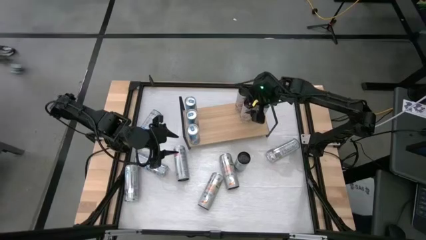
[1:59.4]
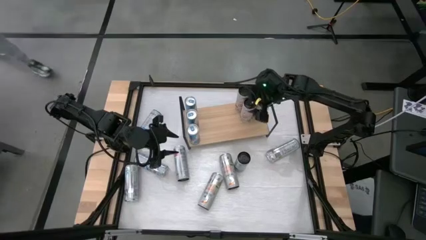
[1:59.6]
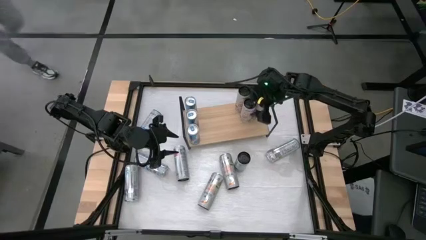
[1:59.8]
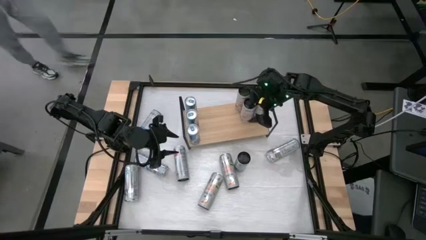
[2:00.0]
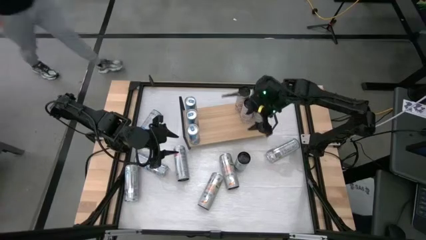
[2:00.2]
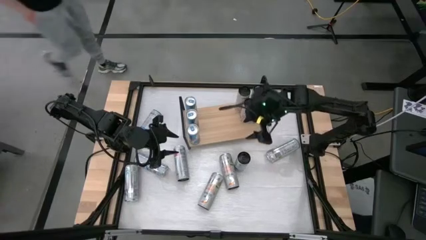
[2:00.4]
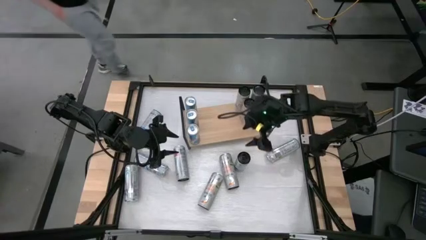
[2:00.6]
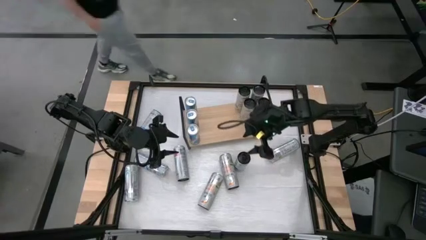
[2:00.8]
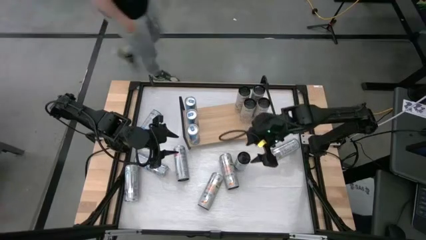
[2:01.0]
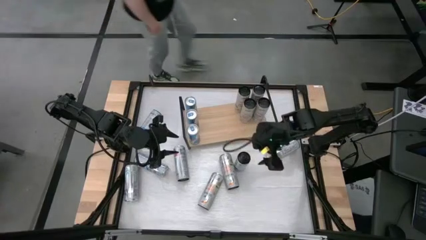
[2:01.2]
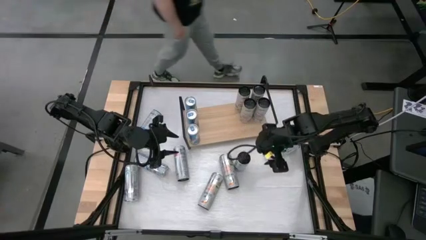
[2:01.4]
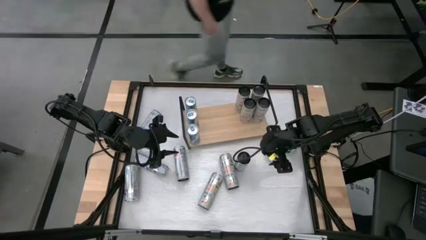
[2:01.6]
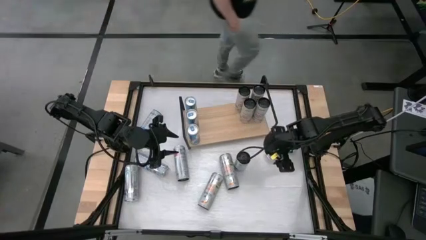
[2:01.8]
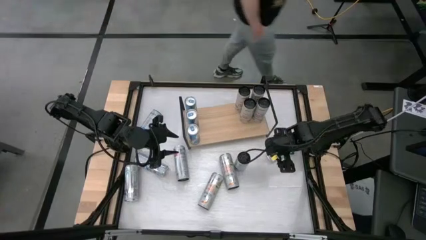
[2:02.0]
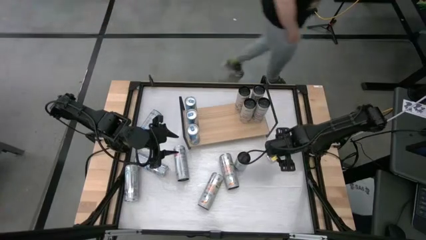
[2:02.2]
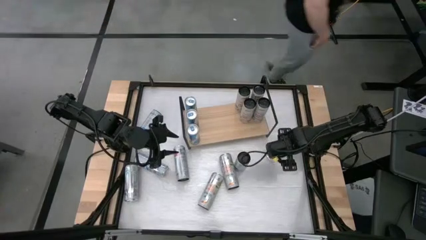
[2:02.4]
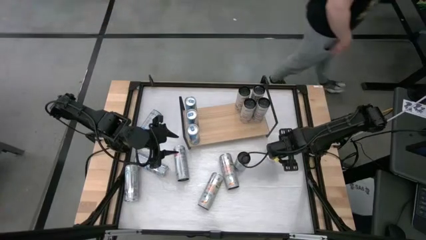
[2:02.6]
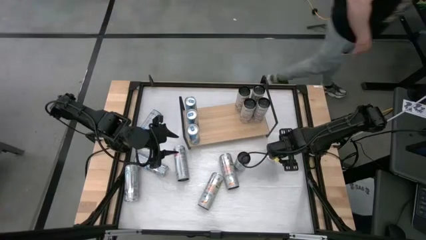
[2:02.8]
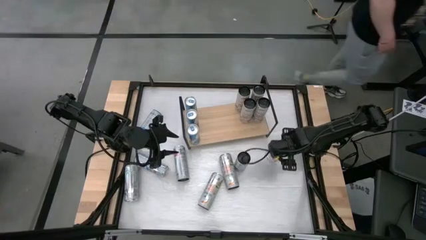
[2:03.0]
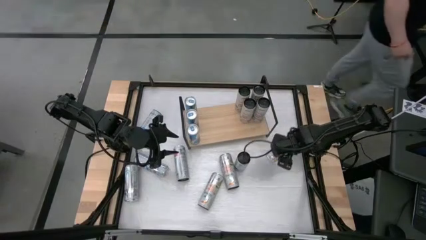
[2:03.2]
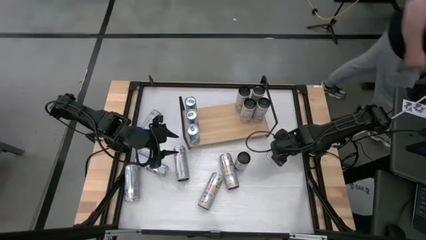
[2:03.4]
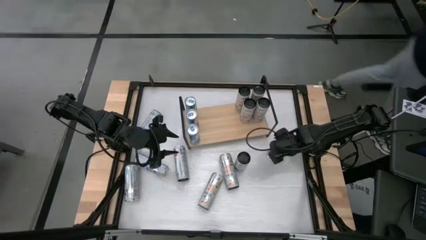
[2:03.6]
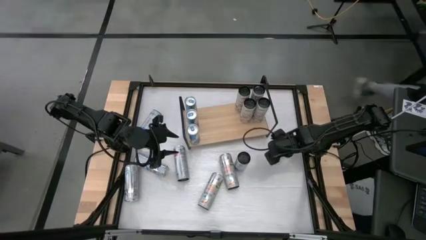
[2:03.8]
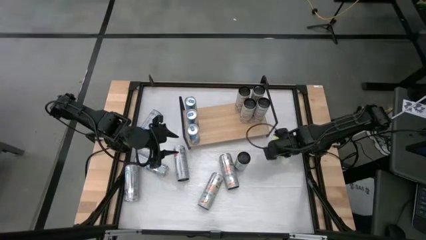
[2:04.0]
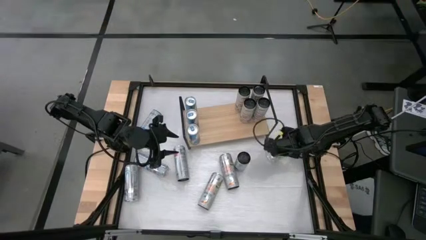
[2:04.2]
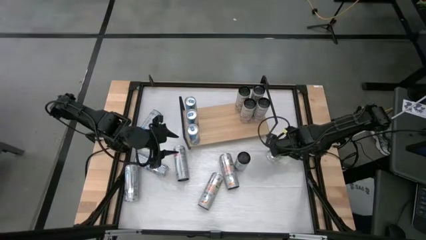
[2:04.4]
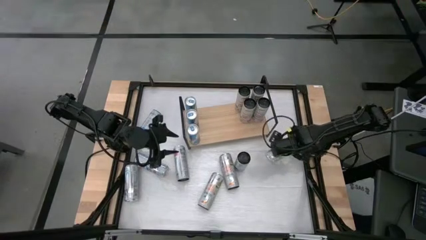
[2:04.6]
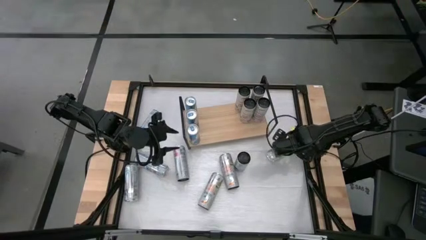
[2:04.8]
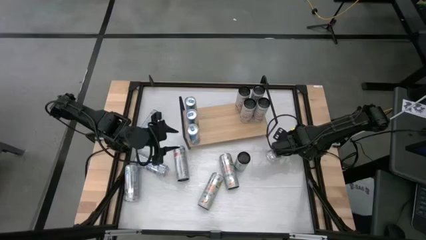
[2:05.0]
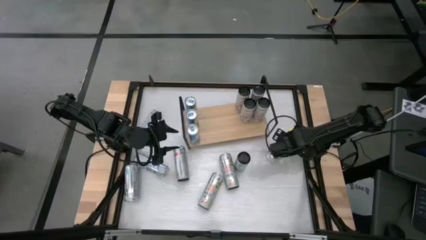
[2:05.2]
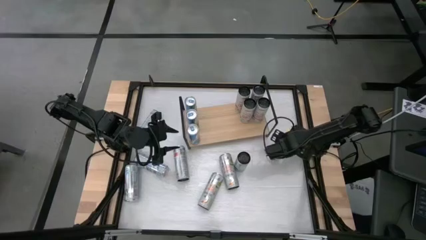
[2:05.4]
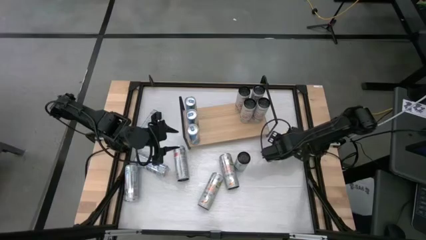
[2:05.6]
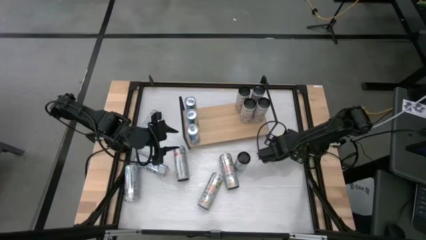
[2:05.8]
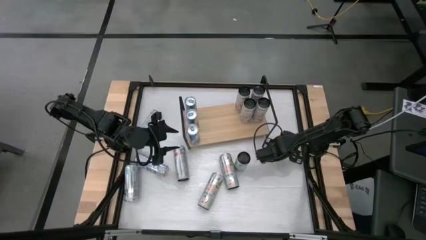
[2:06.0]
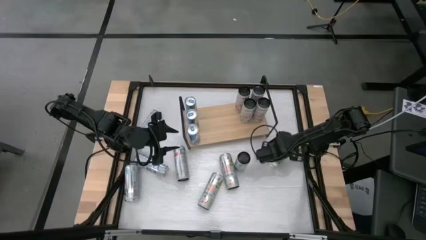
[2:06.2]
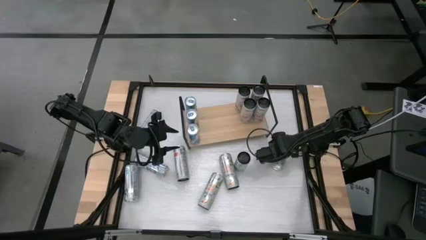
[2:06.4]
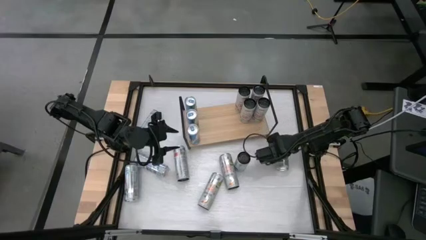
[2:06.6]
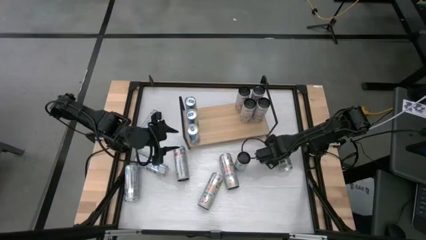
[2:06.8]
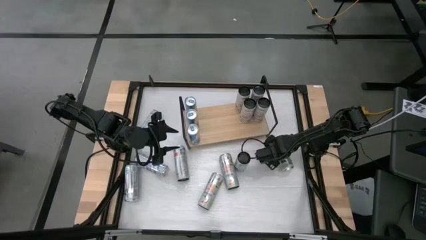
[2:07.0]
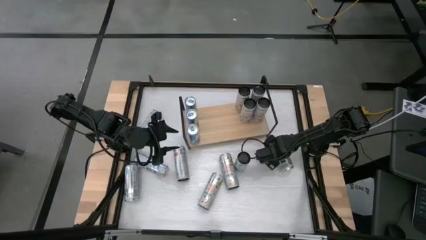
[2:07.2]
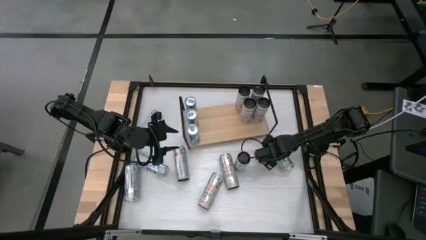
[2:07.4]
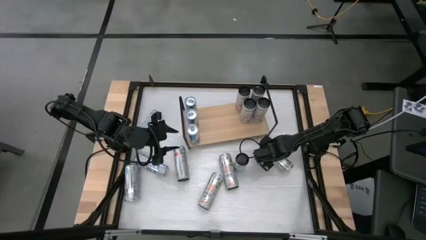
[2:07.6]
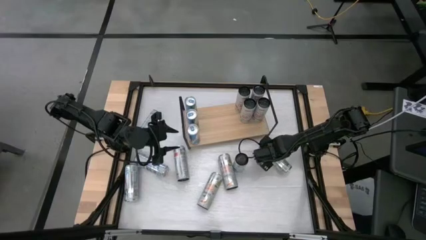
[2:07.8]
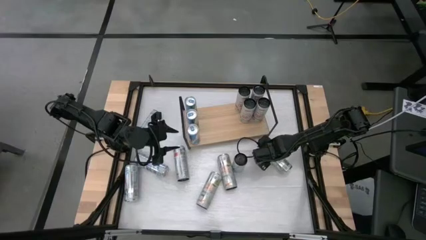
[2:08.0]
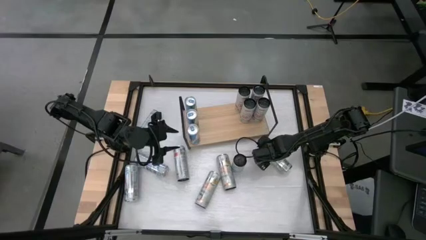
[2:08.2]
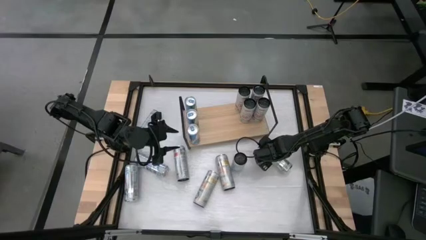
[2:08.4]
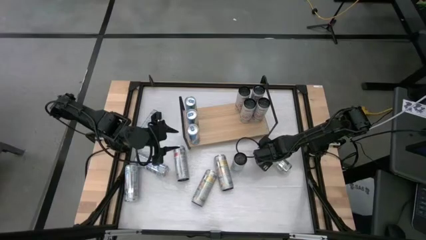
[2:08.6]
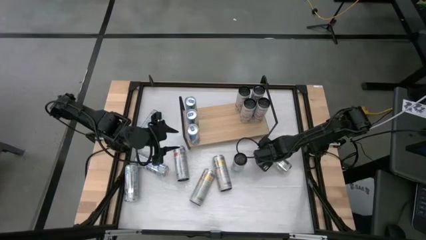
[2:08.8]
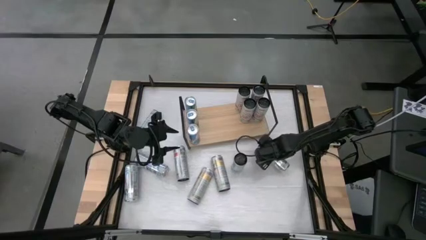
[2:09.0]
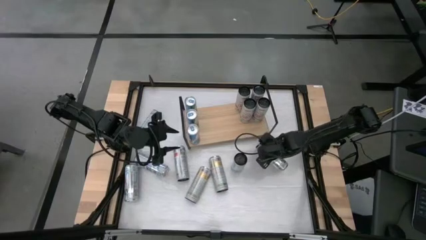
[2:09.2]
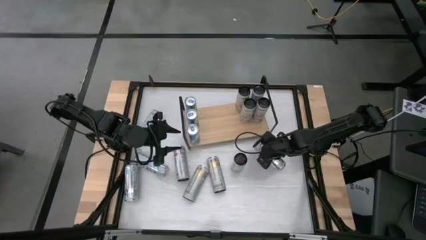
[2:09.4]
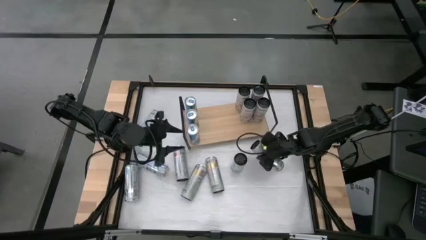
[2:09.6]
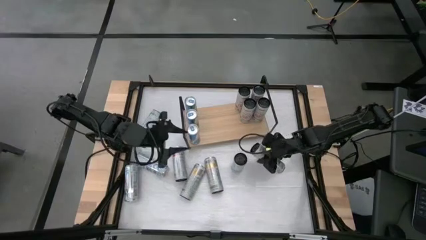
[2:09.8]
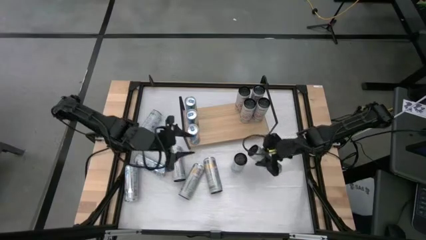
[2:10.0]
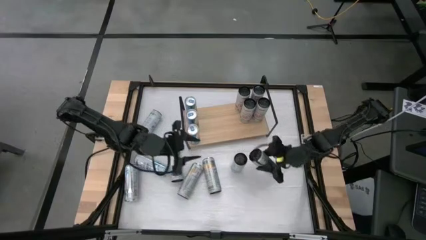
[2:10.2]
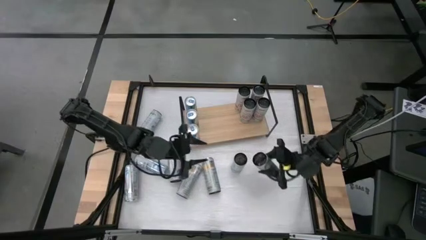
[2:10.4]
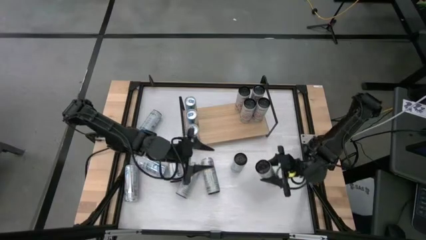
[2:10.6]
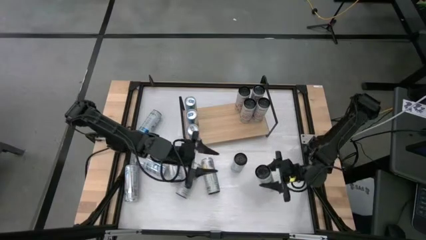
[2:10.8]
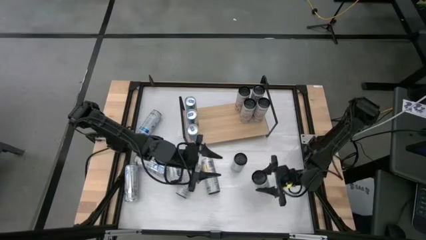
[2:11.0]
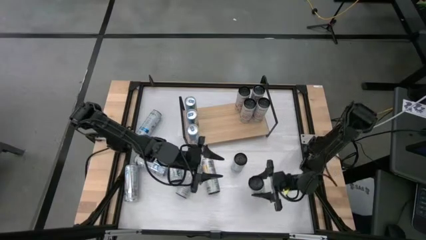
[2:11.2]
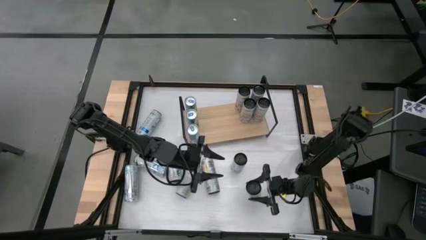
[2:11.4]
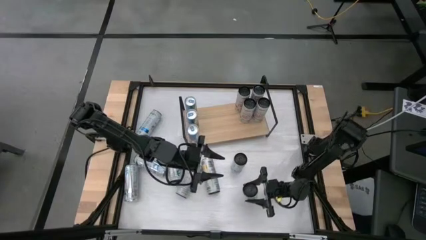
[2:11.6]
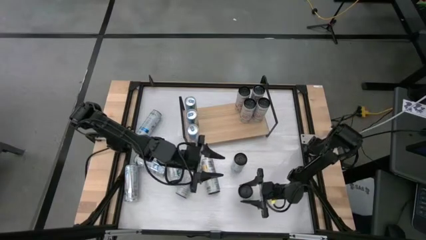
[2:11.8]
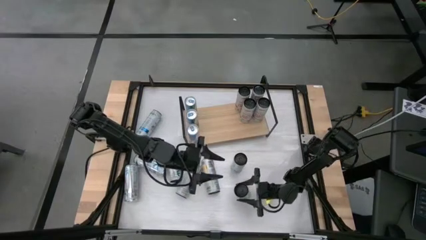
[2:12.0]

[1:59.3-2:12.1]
Task: Place canned beverage on shelf
Put the white-yellow soda can on the shelf

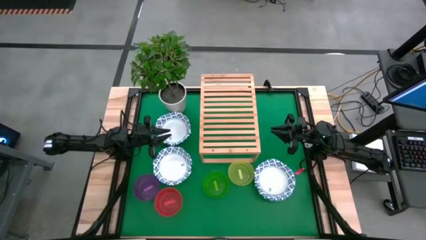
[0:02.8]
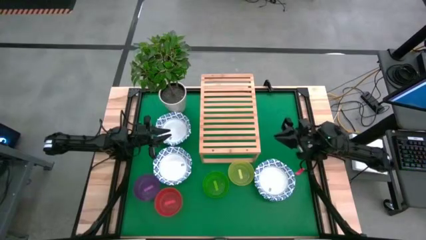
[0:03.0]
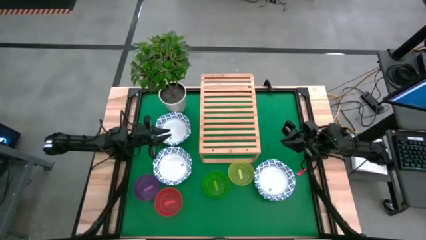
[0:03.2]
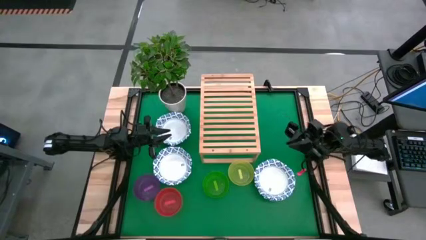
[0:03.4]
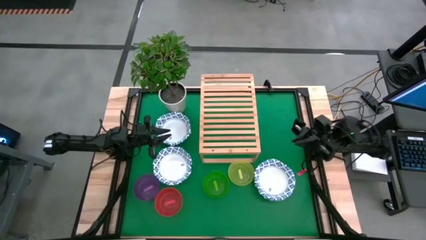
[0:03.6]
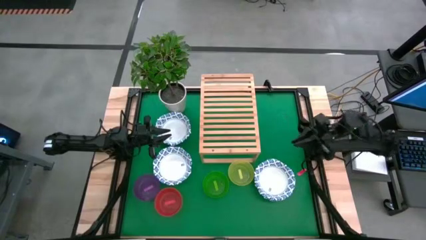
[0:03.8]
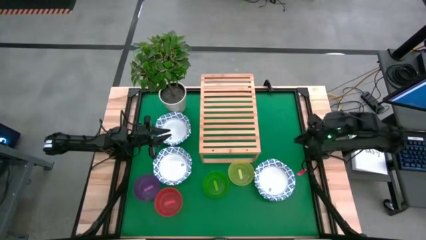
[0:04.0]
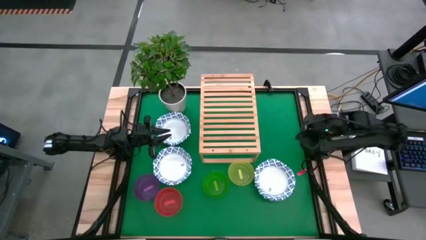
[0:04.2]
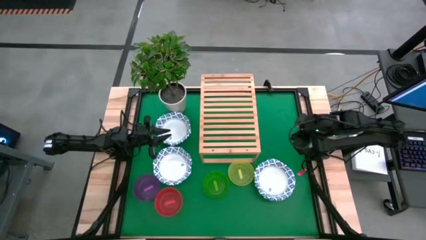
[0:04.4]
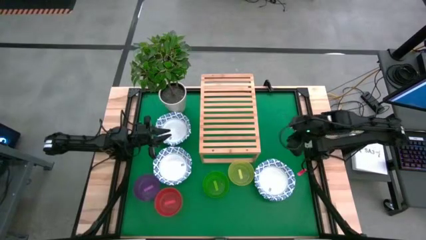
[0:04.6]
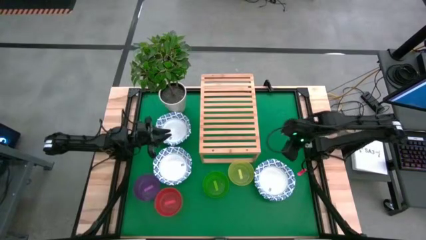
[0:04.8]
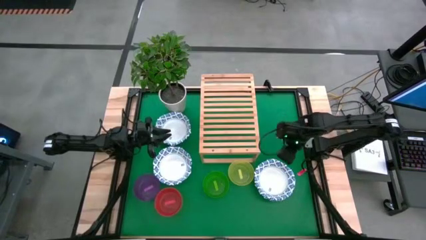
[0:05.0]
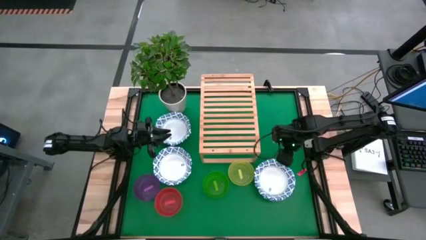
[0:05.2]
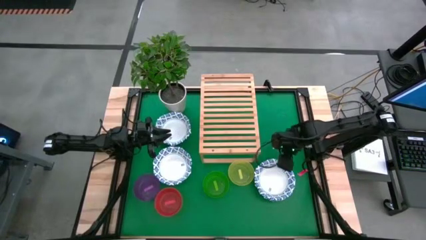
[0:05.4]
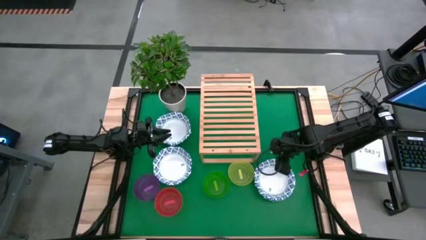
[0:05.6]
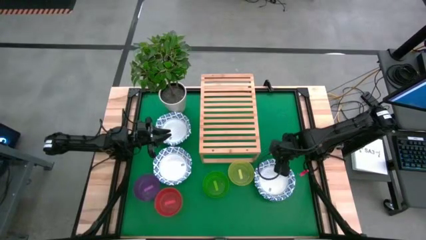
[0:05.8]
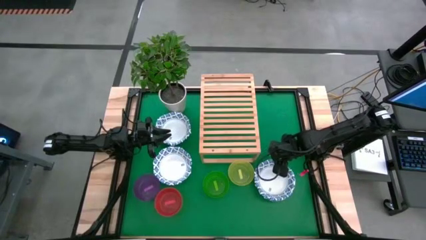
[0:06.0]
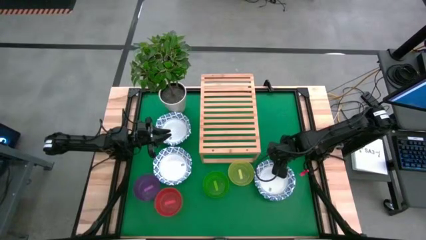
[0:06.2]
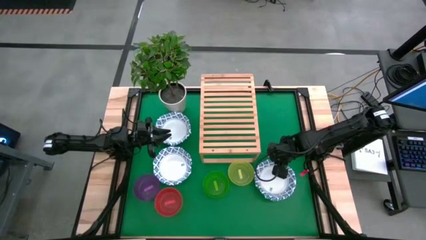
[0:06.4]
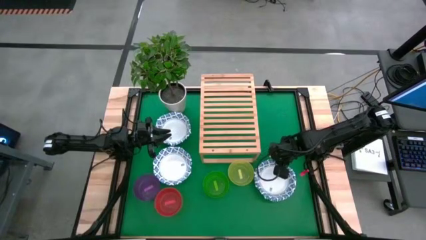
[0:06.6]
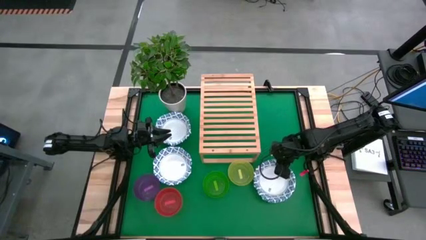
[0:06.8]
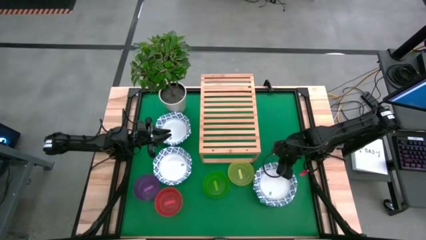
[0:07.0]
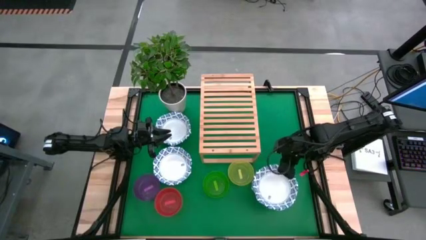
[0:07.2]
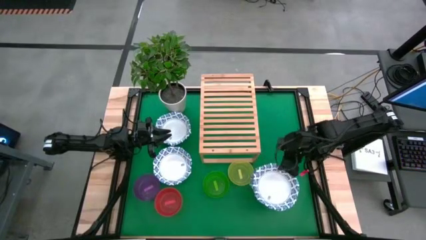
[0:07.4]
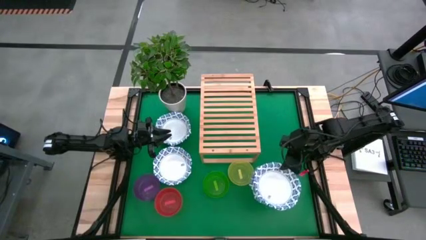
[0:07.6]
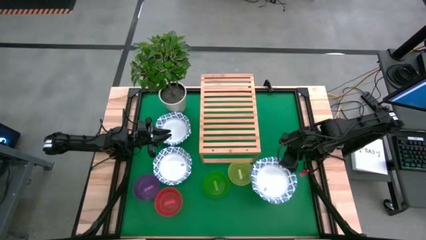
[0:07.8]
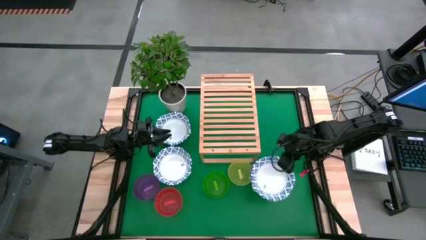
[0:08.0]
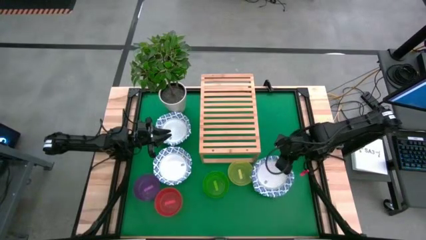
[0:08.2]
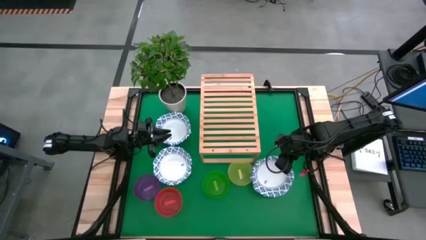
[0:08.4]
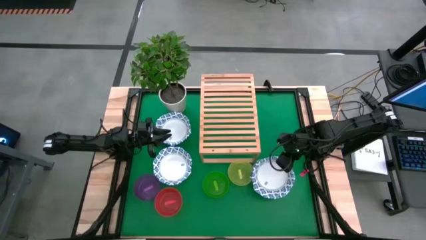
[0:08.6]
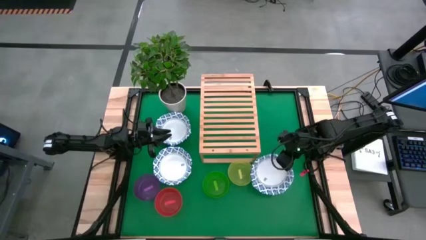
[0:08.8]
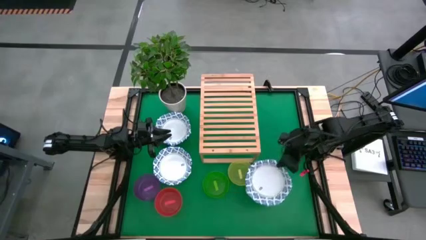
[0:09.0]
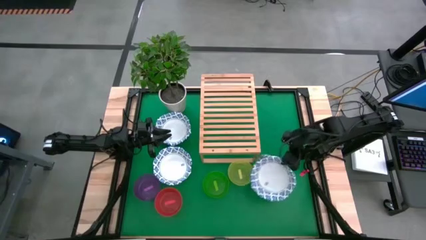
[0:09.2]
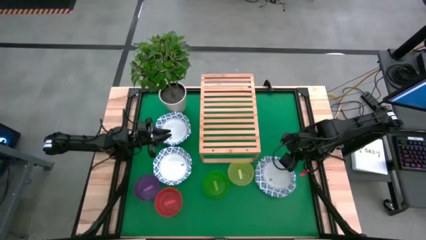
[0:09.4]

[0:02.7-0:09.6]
Task: Place and stack bowls onto a shelf
Put the white patterned bowl on the shelf
